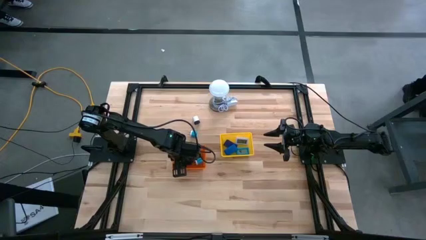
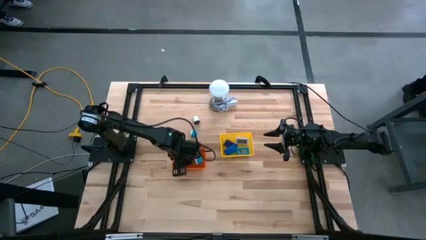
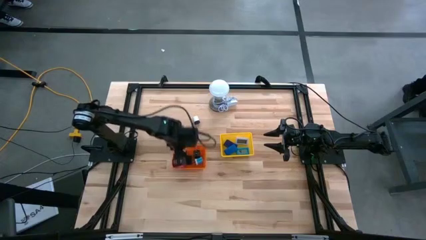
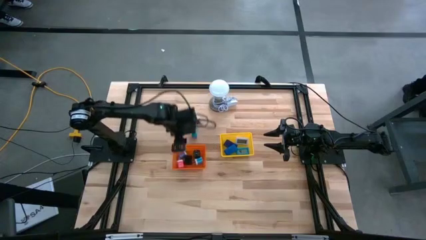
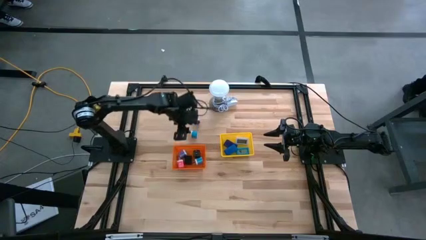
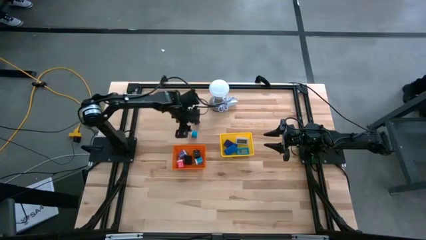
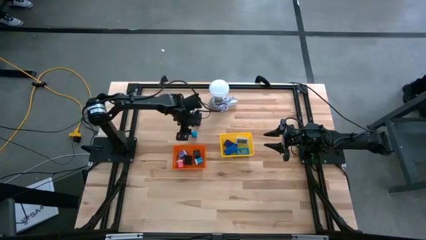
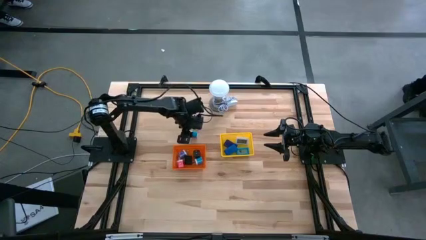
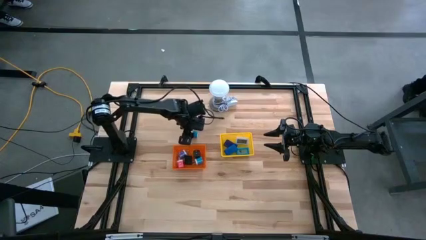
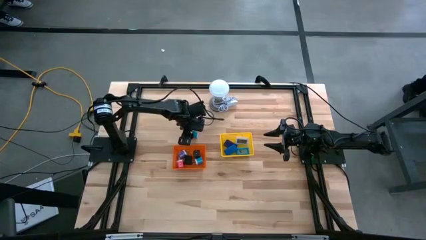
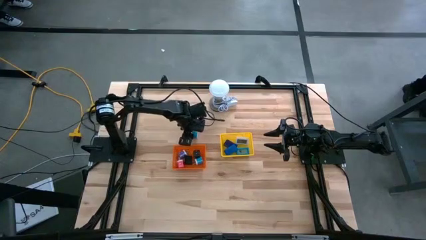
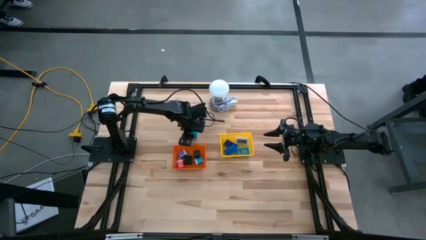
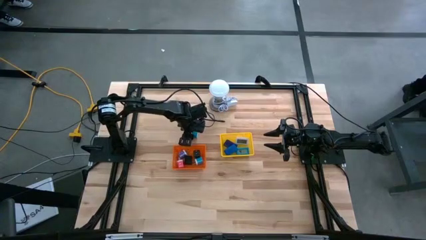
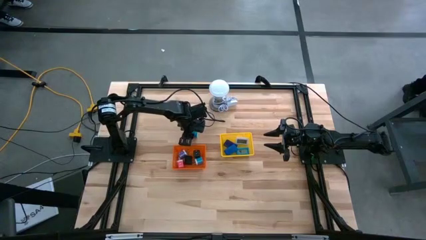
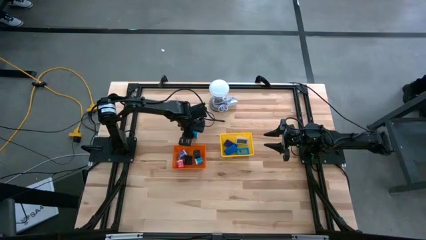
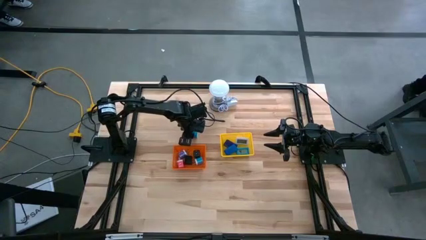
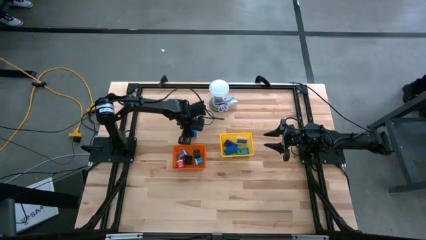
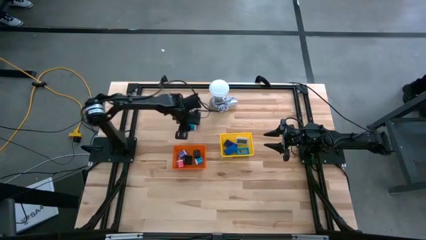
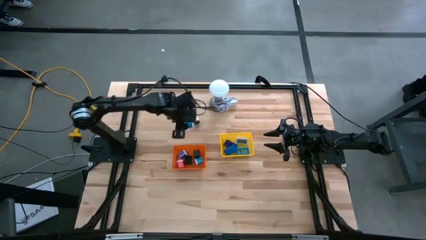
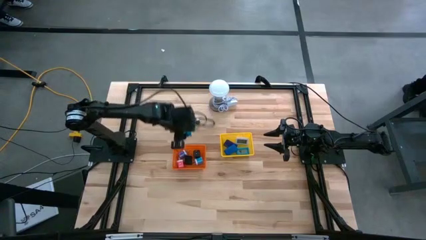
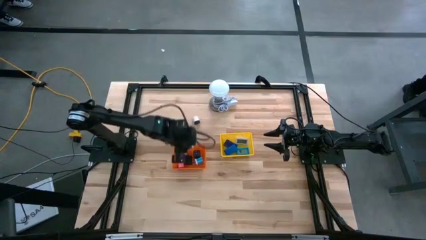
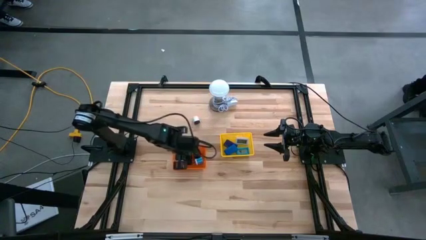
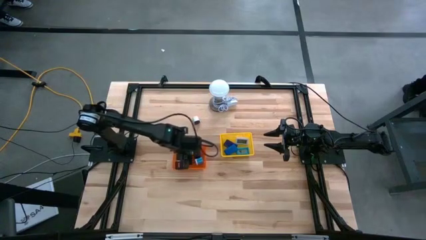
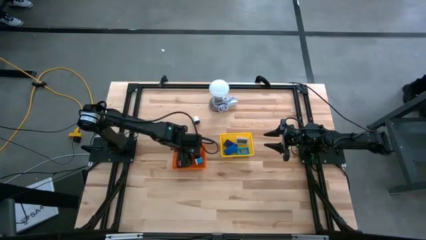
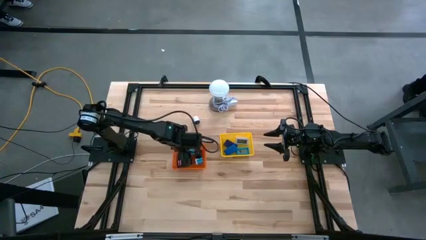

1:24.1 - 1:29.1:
Task: Pick & Place Office items
Put the light blue charger adapter into the orange bin

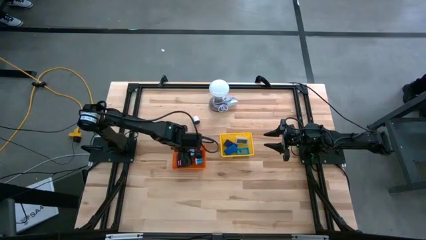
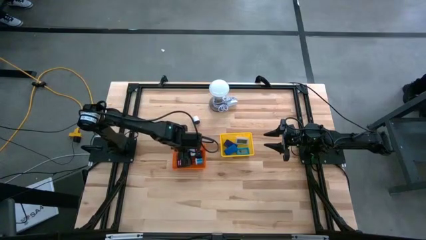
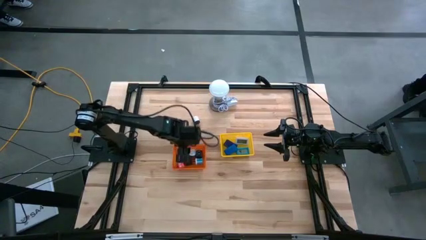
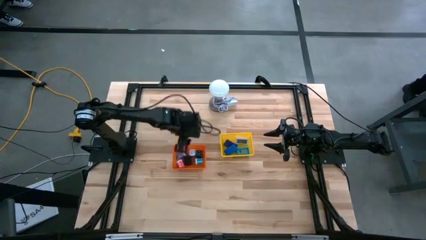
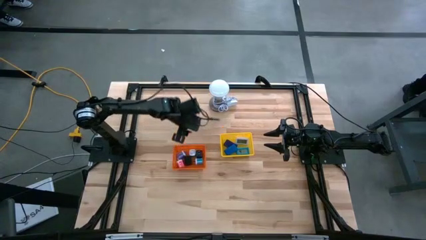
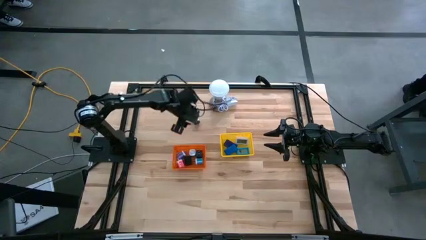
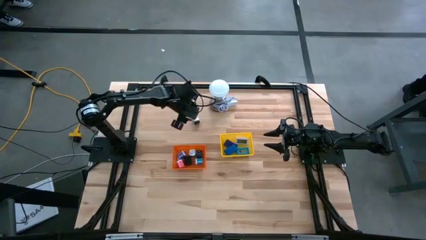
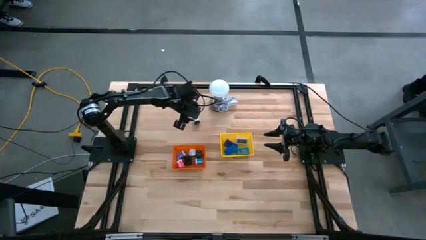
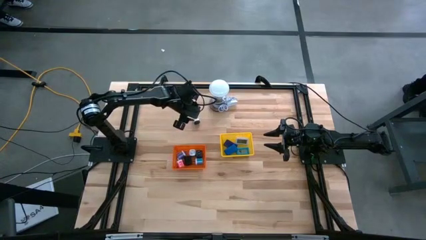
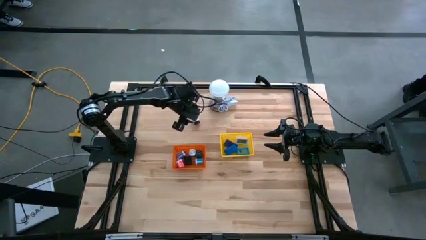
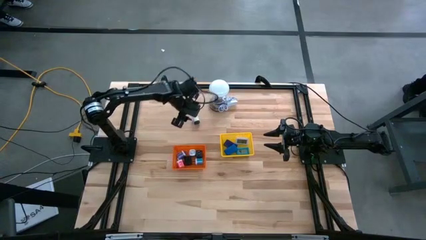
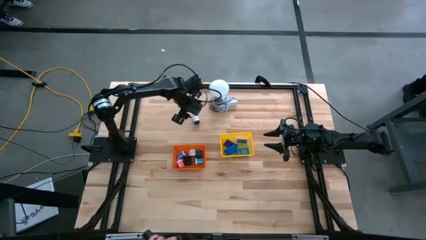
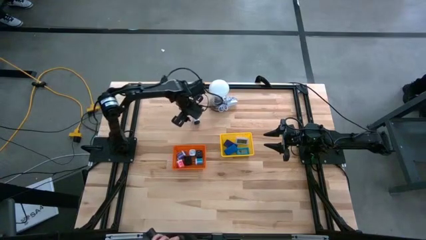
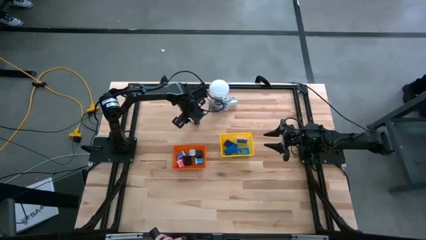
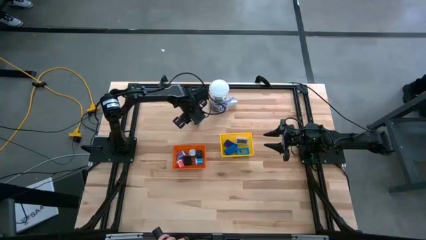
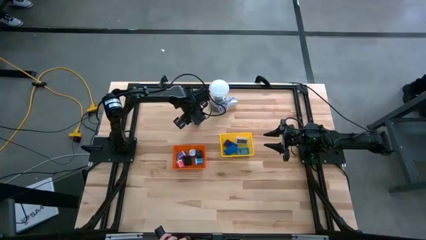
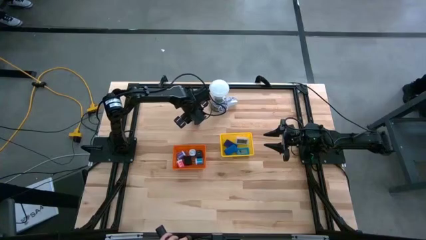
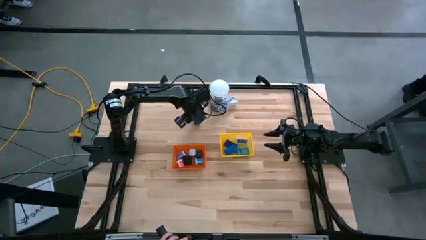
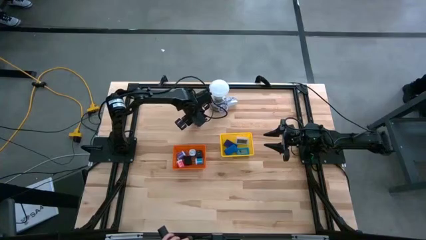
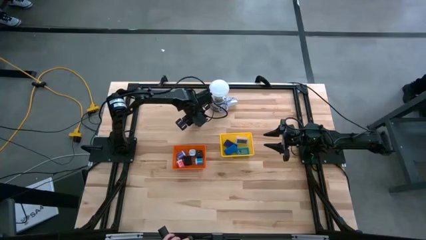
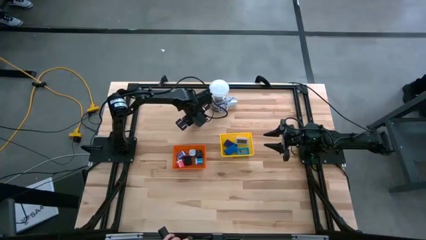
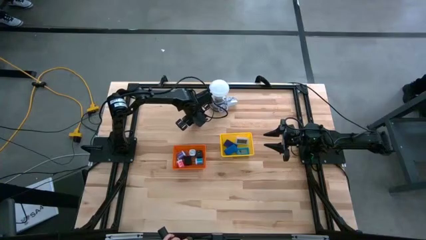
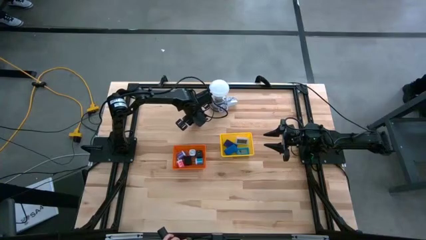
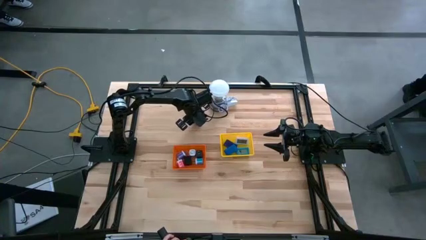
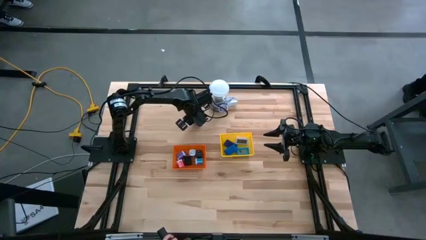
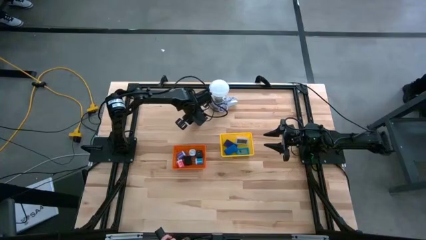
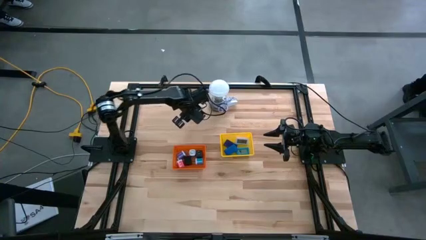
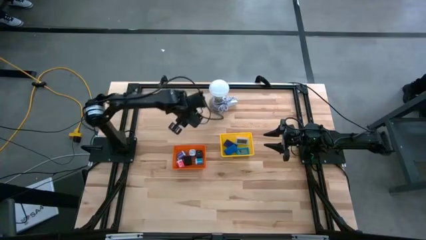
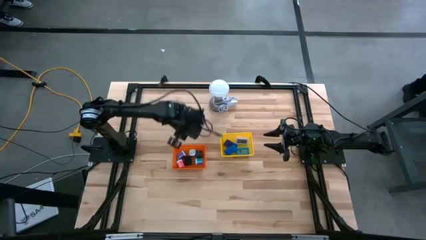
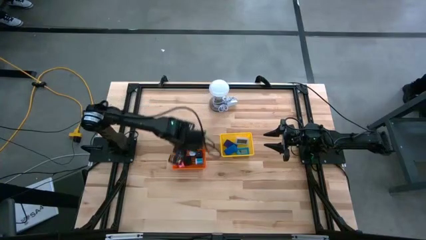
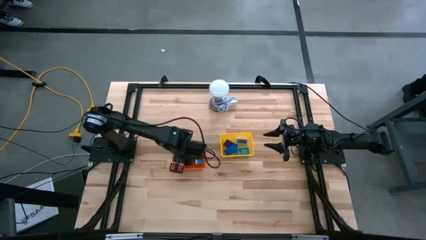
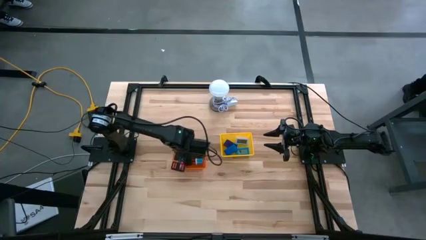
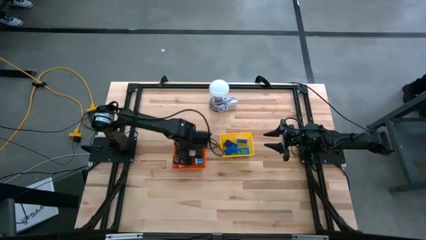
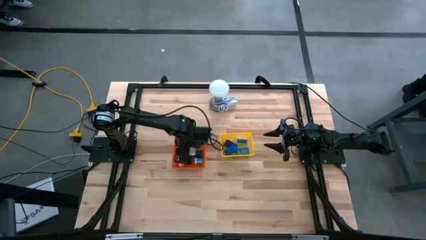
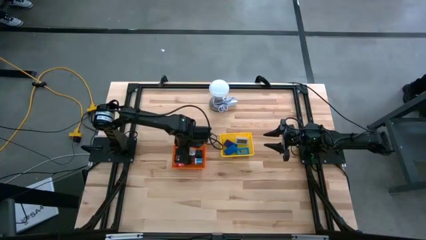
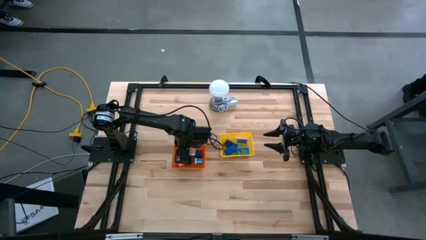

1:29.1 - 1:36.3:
Put the white charger adapter into the orange bin

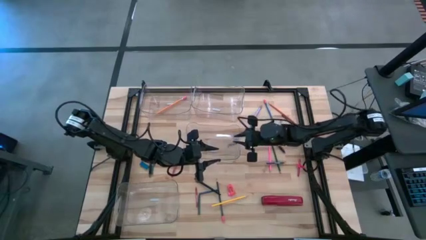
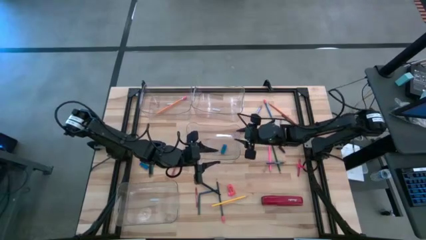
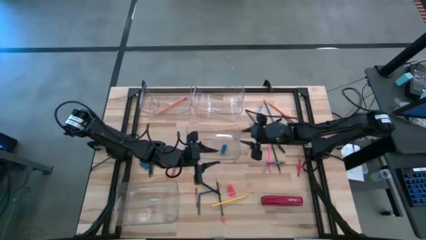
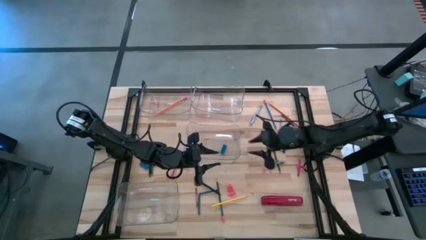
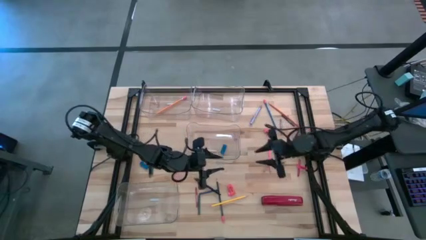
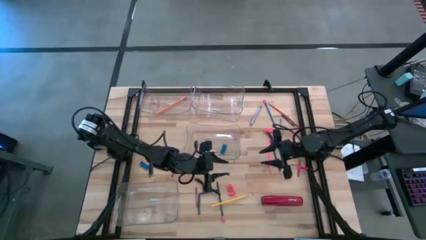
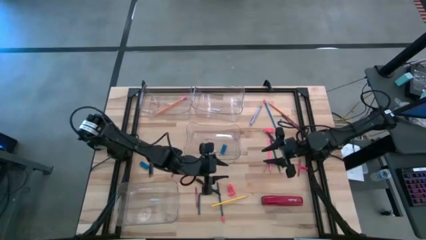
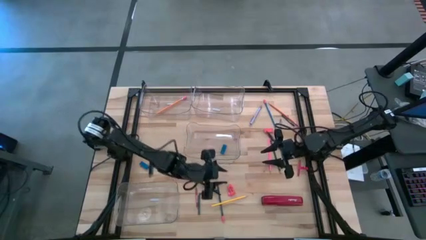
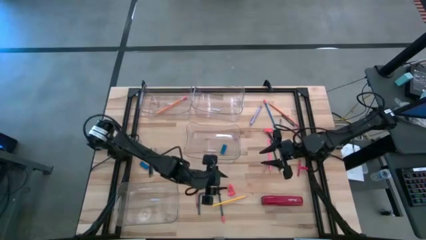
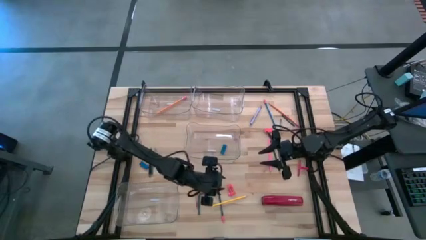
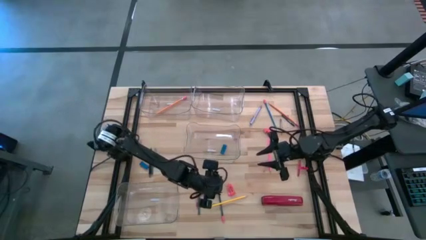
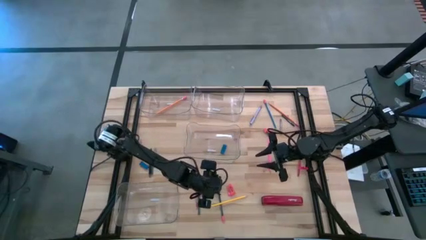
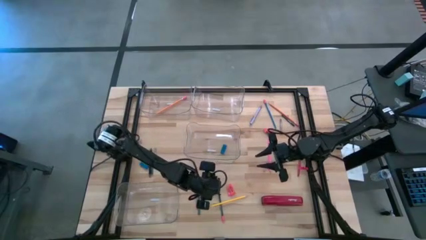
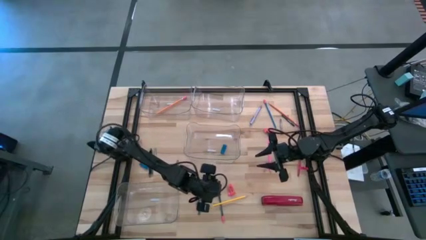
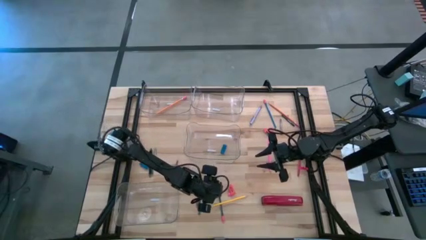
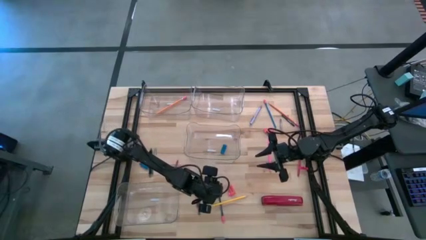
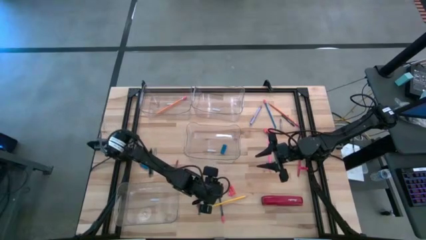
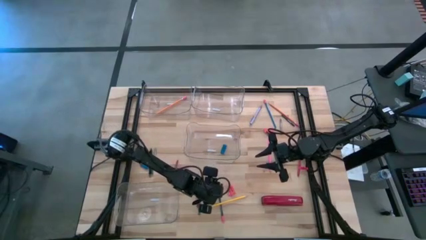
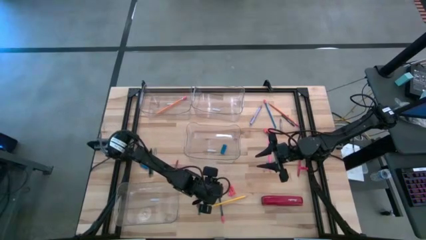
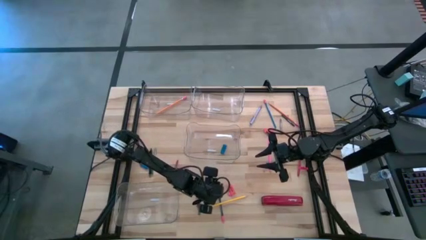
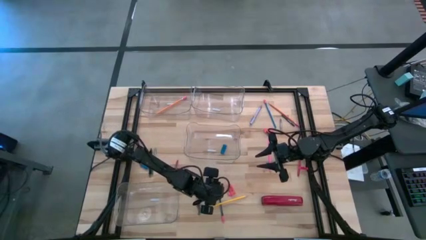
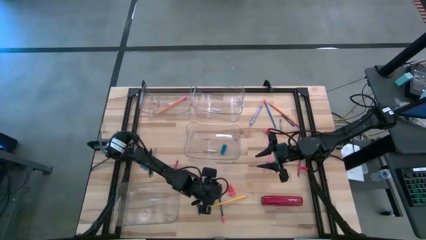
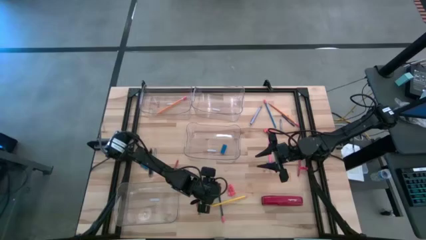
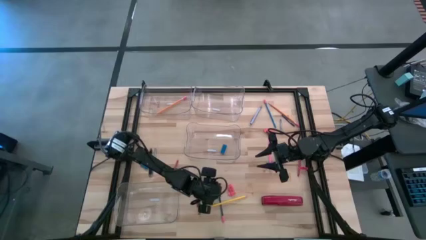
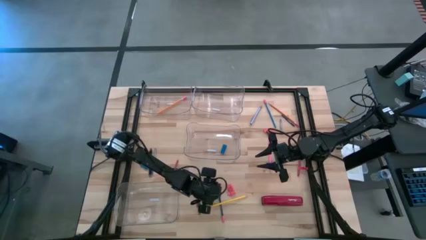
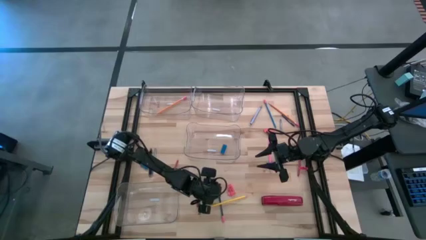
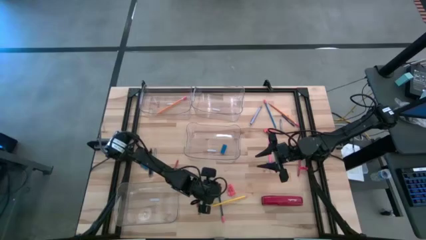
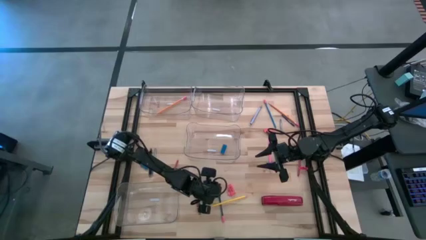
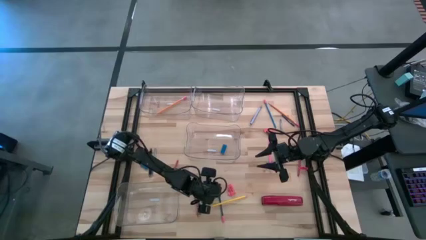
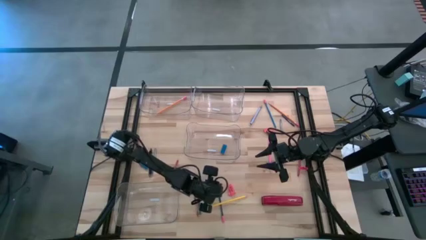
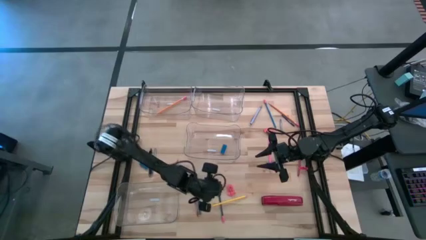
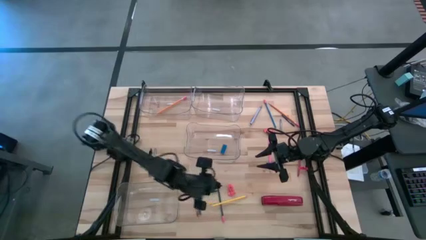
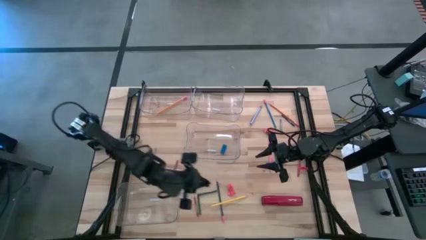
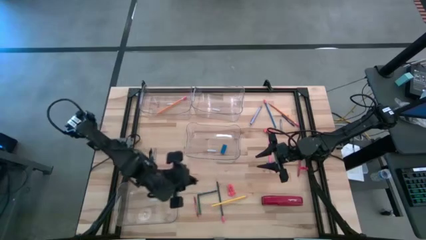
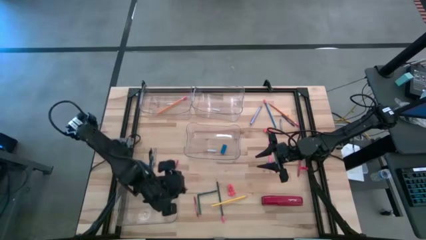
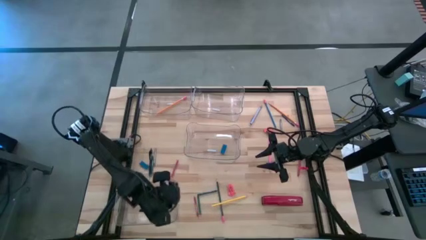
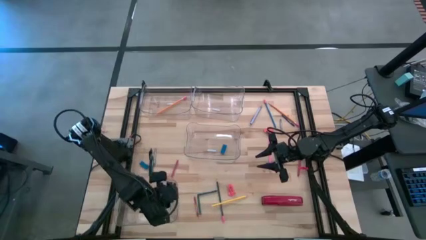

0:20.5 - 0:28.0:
Task: Sort crayons/erasers/pens/pencils in bins
Put the bottom black pen into the bottom transparent bin
